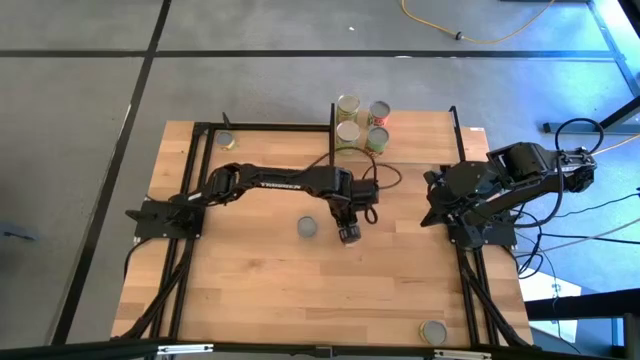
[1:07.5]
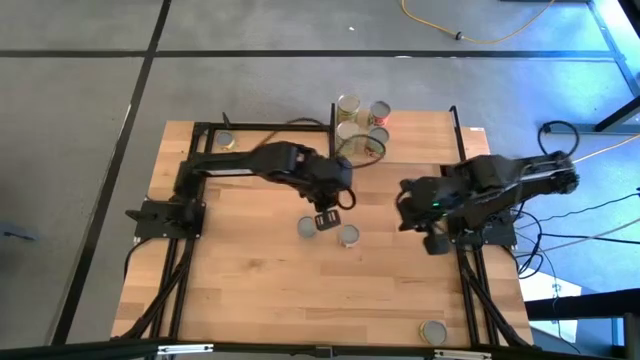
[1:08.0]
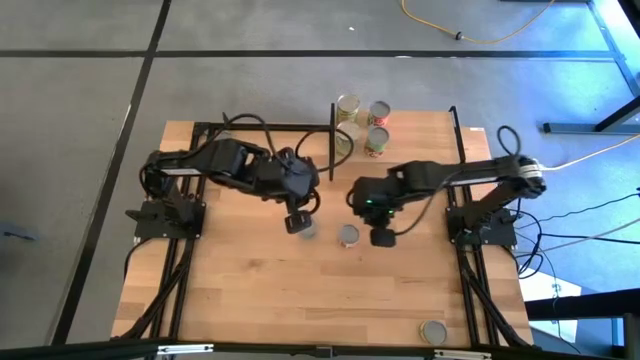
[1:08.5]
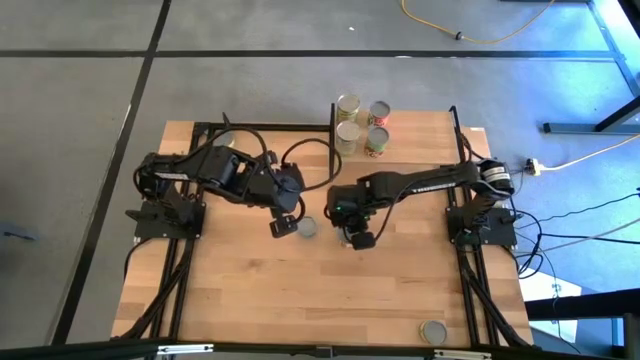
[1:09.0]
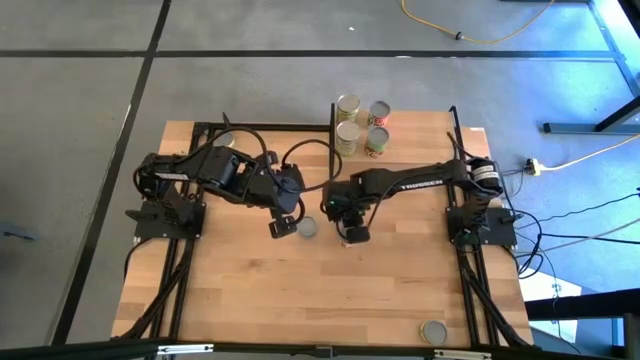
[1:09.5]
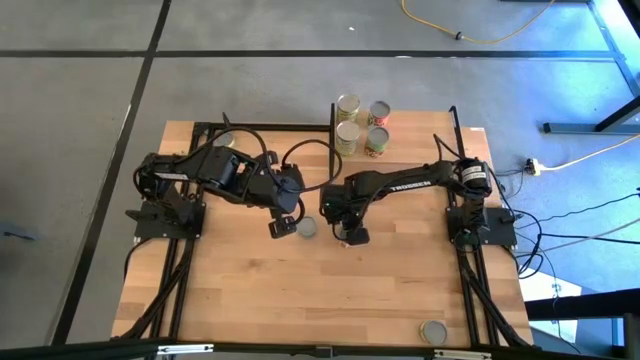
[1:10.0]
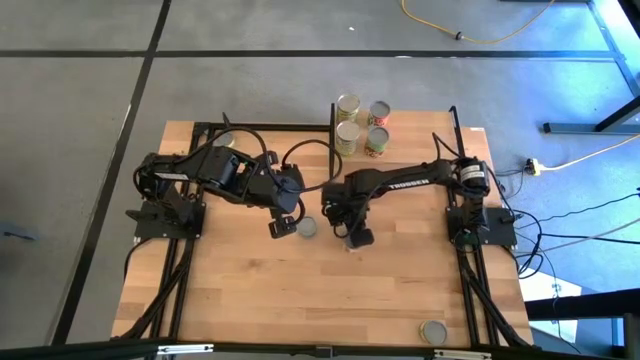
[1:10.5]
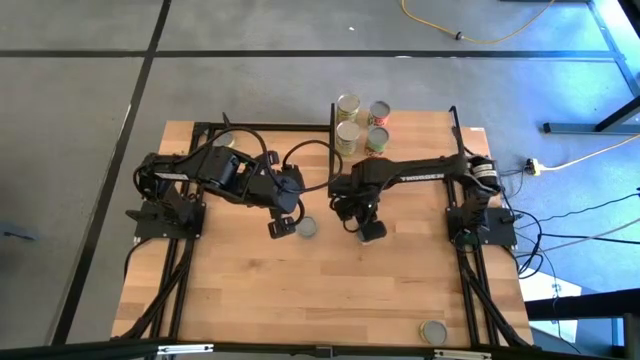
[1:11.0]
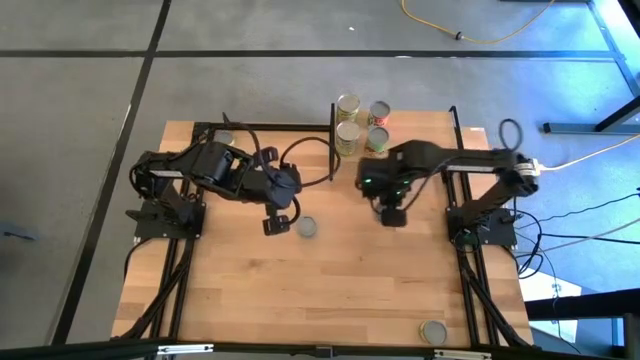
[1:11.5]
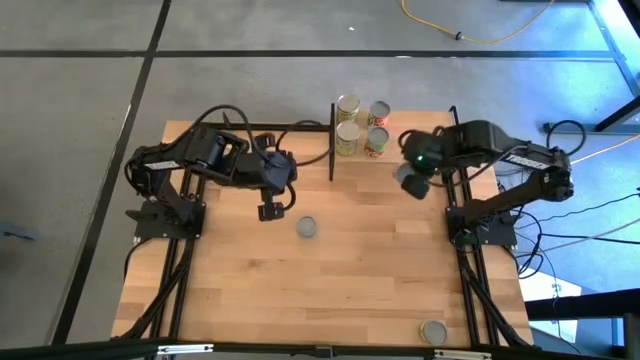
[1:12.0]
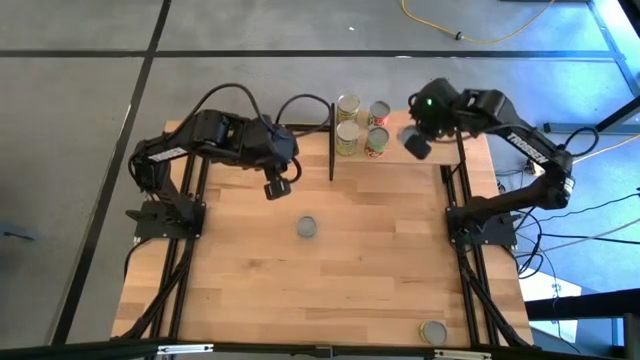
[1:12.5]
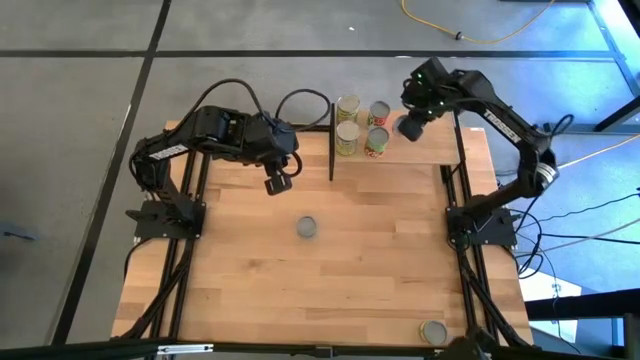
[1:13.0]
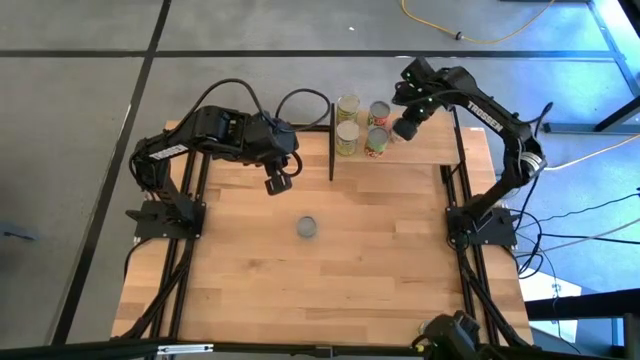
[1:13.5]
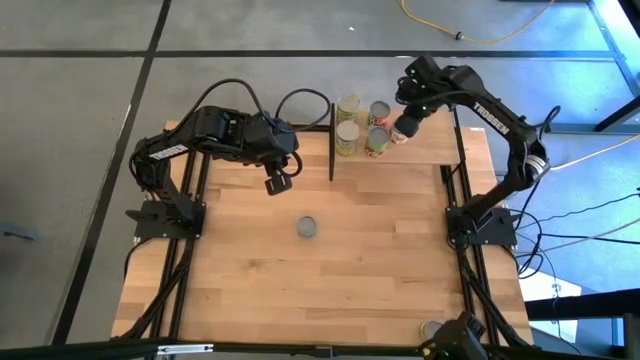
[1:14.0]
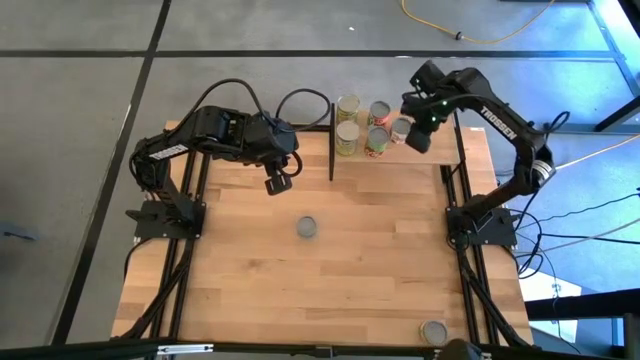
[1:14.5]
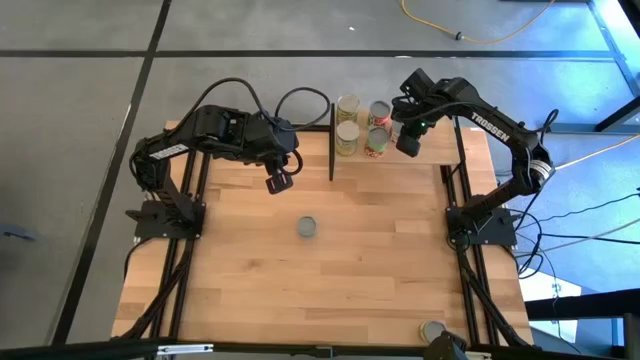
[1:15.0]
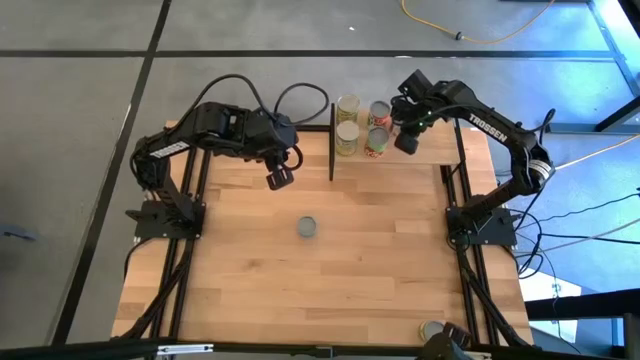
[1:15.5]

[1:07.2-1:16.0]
Task: Pick and place cans onto a shelf
Put the white and orange can on the shelf

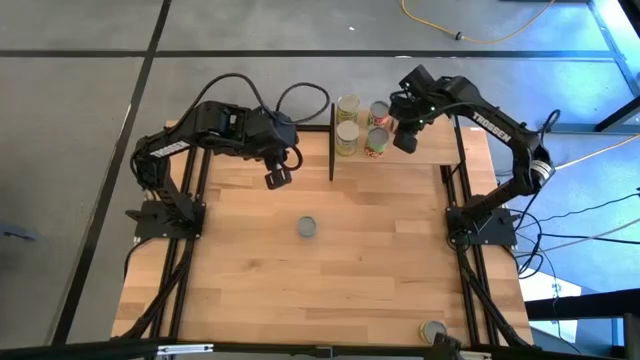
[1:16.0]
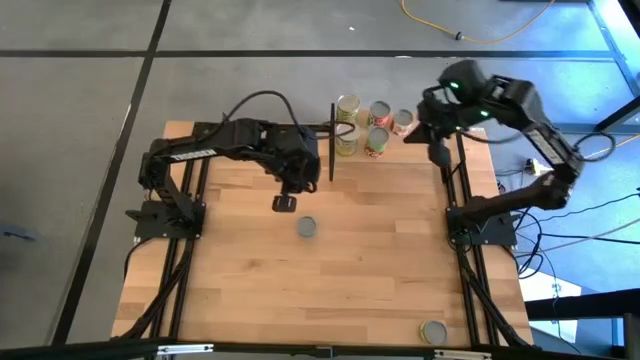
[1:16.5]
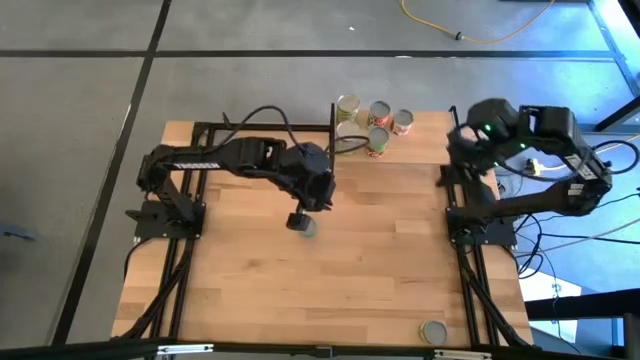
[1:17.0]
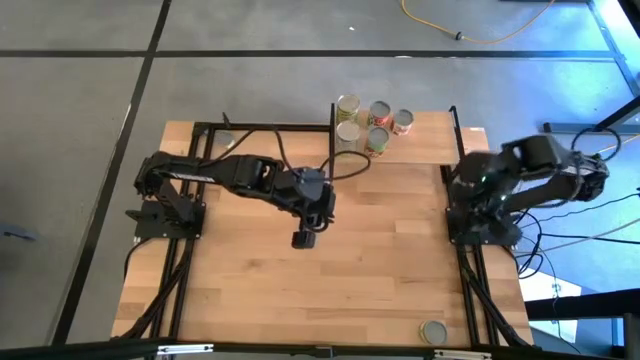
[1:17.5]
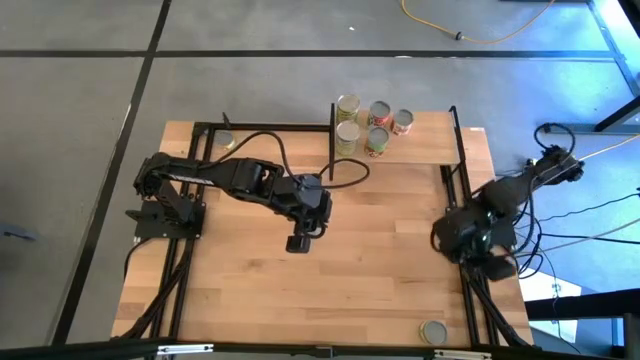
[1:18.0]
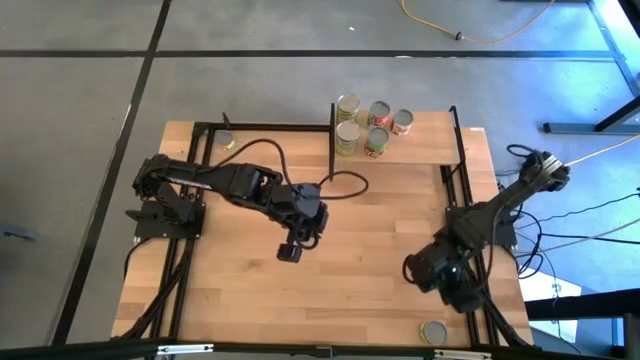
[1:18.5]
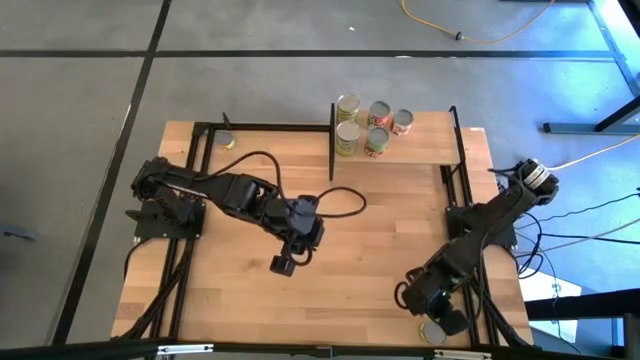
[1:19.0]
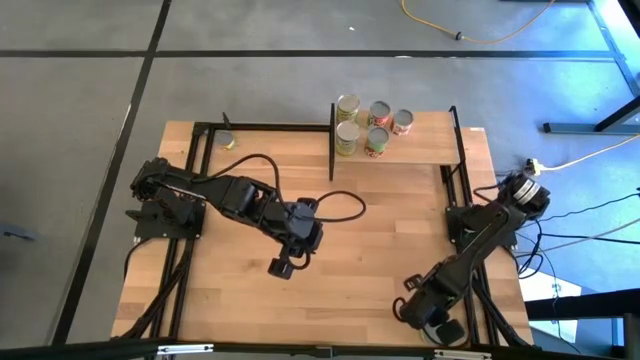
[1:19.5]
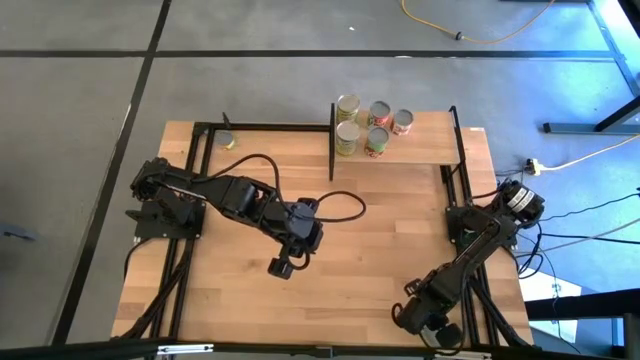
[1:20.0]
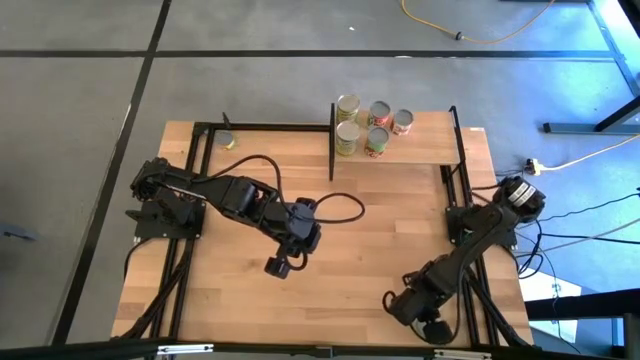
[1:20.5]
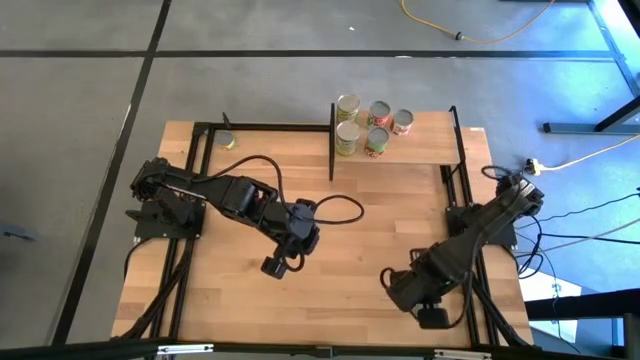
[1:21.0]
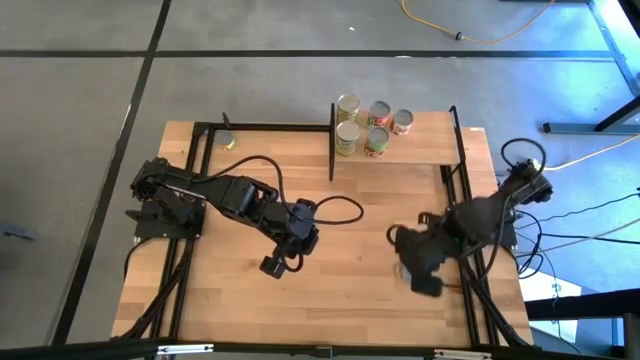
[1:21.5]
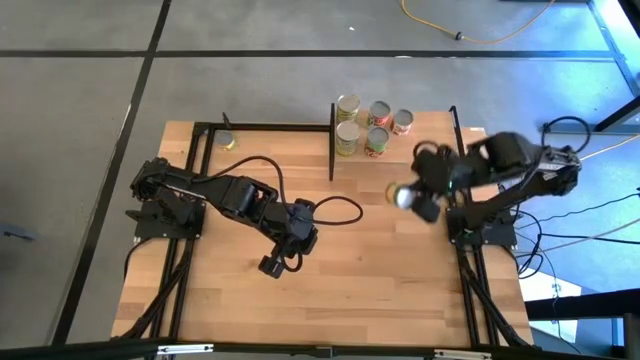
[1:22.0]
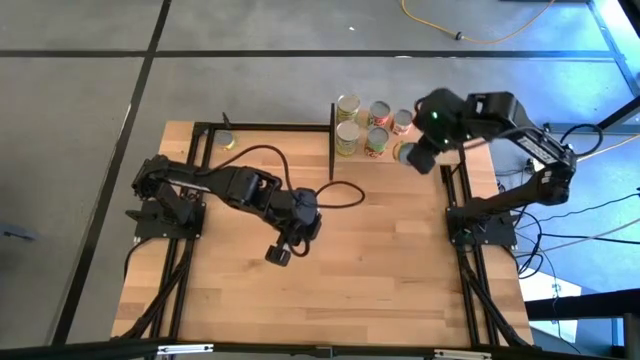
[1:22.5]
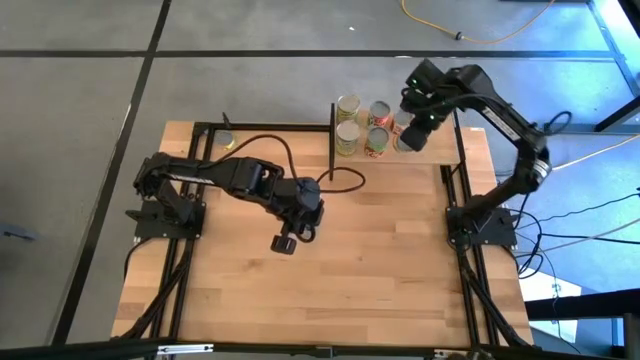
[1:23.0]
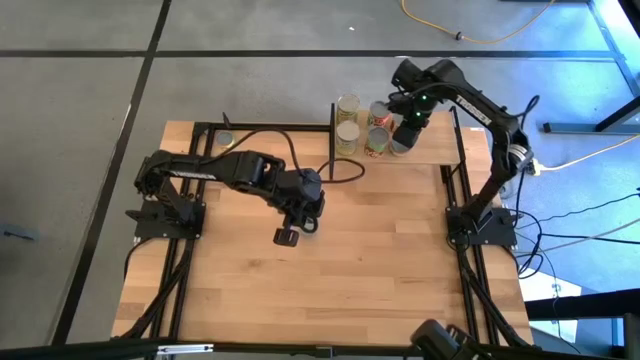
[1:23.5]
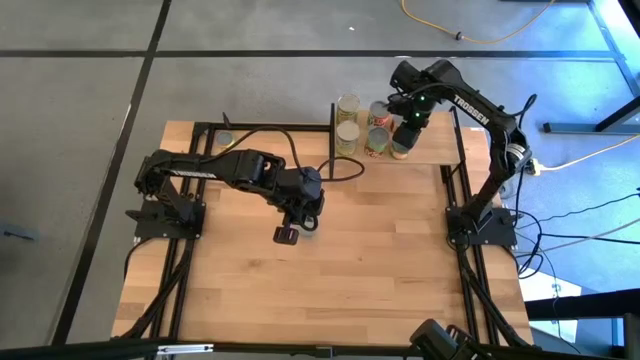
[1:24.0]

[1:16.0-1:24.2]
Put the dark green can on the shelf

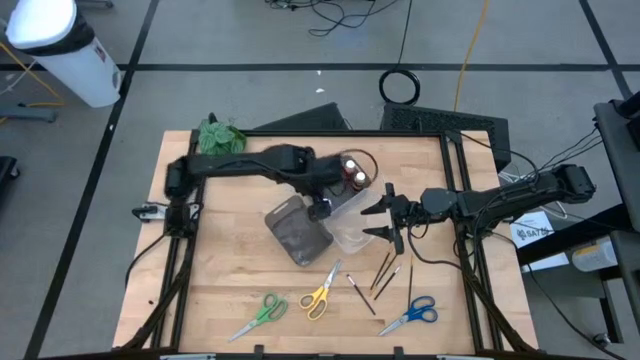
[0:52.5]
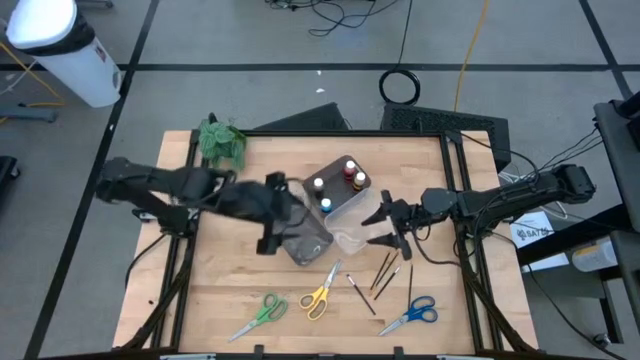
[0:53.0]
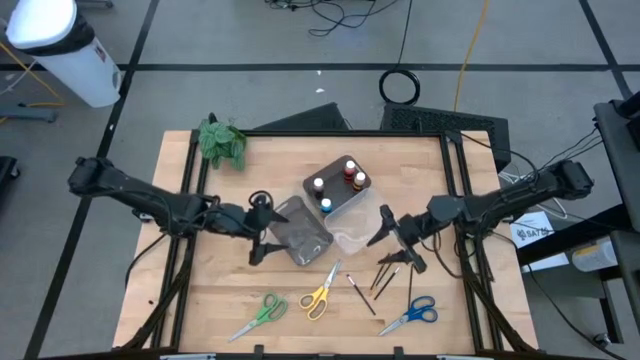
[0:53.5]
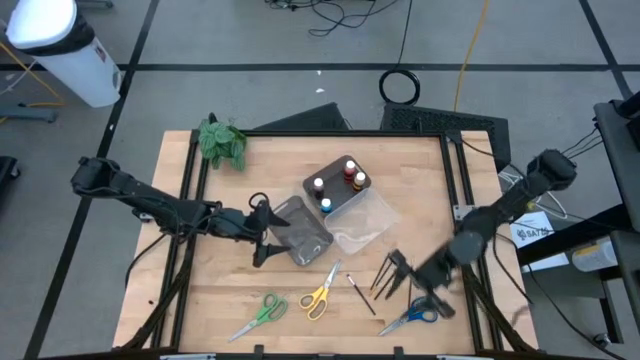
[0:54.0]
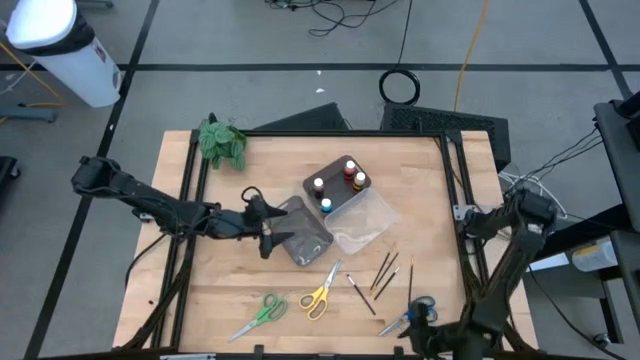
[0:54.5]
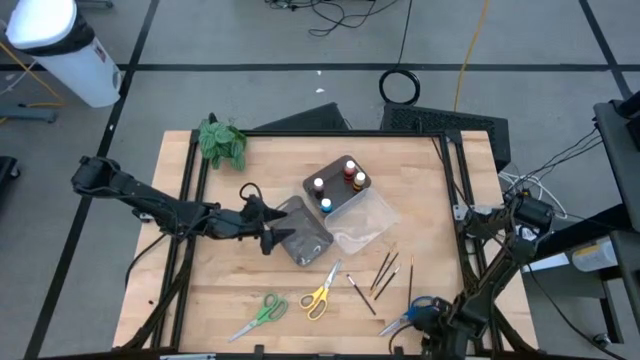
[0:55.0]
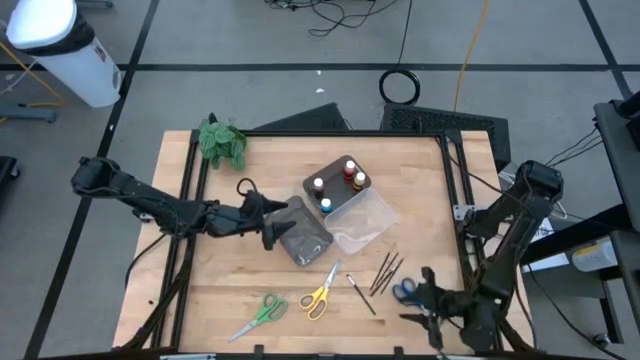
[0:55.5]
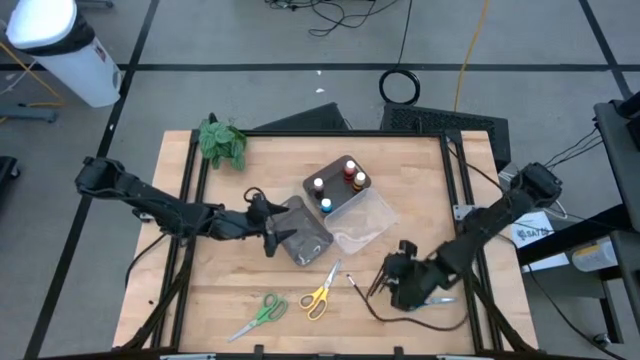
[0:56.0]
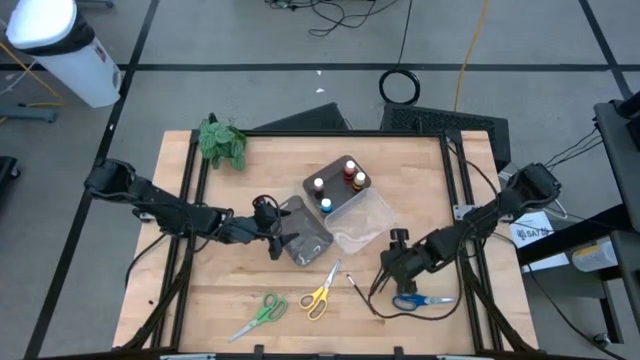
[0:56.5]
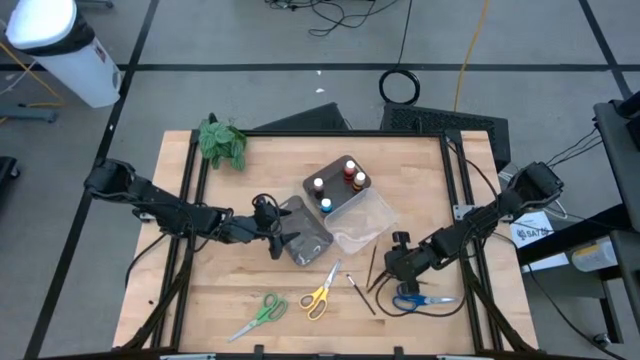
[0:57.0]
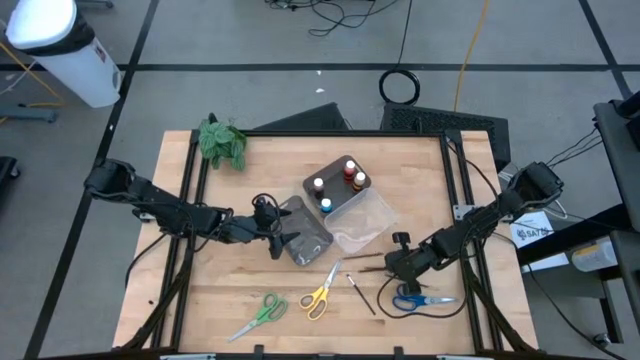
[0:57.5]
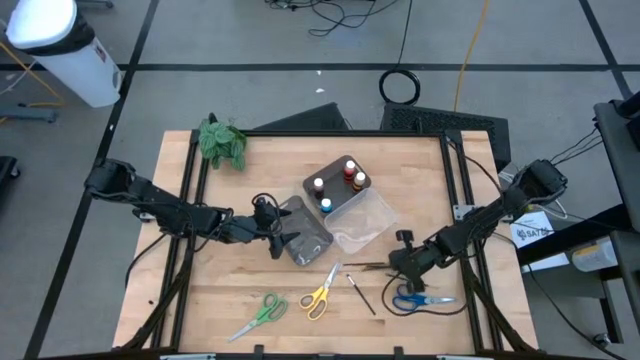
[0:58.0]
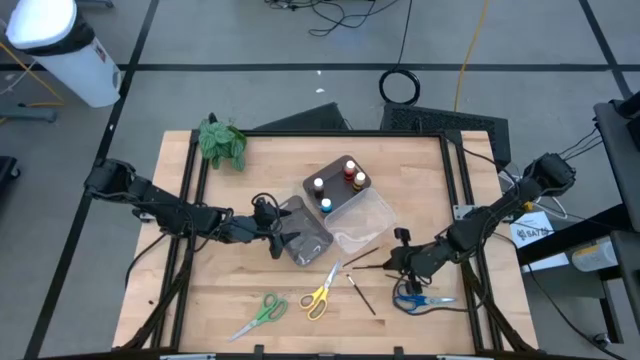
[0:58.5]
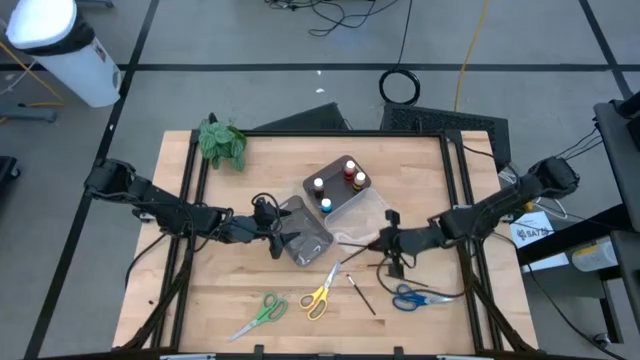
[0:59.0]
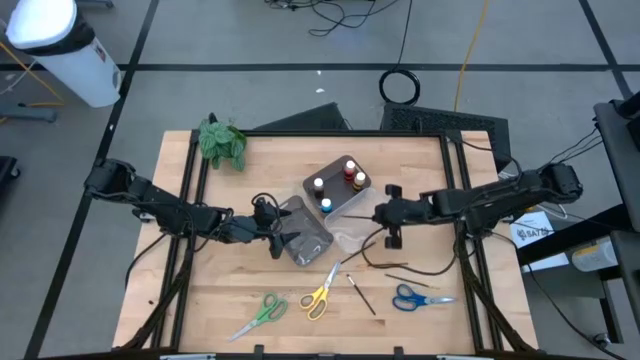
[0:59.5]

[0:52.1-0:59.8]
Task: Pick & Place Paint Supplies
Put the right silver paintbrush into the transparent bin
